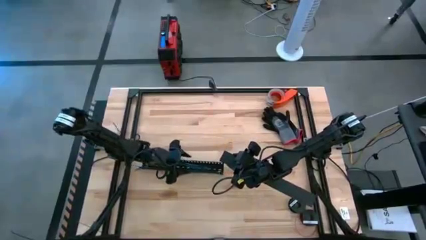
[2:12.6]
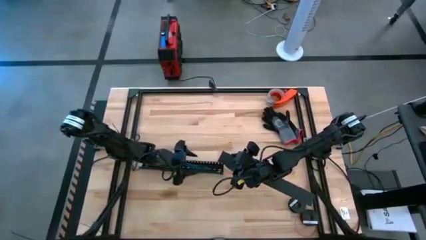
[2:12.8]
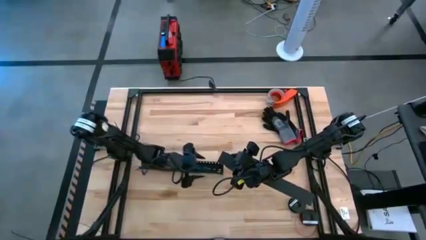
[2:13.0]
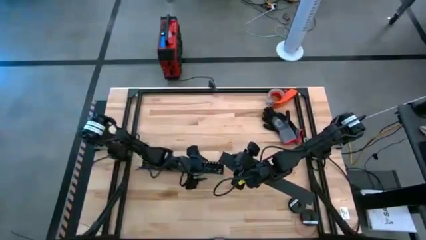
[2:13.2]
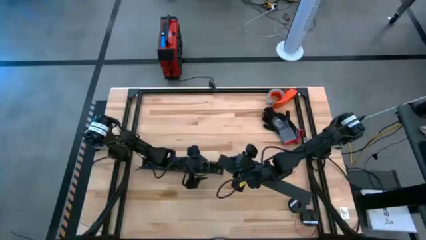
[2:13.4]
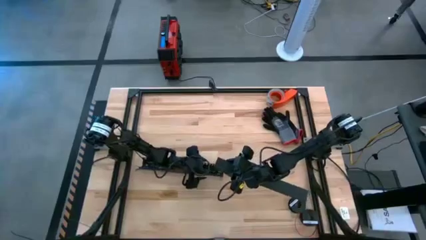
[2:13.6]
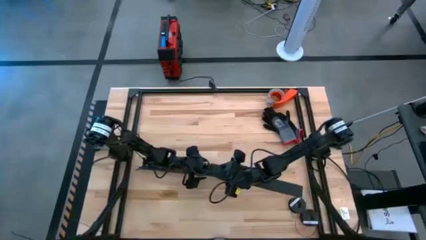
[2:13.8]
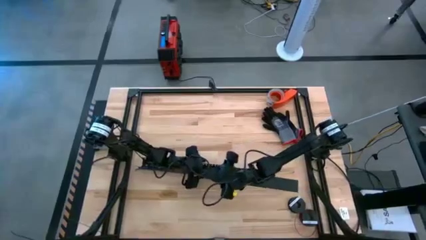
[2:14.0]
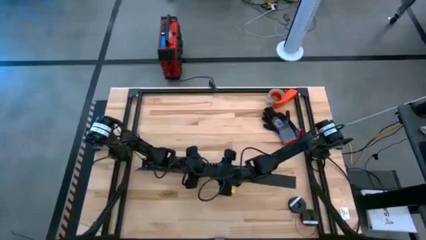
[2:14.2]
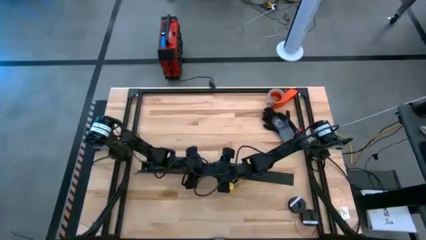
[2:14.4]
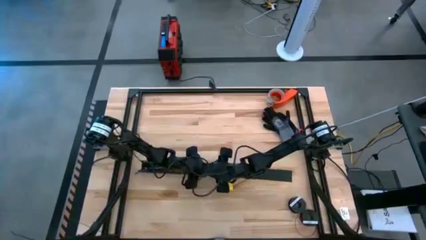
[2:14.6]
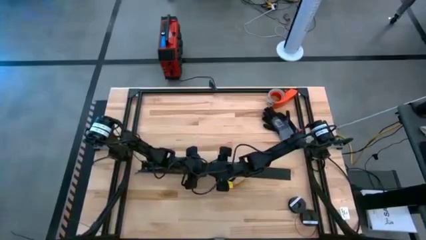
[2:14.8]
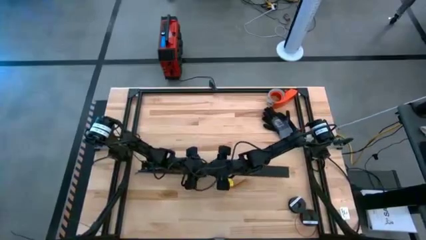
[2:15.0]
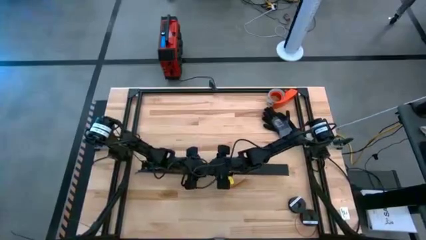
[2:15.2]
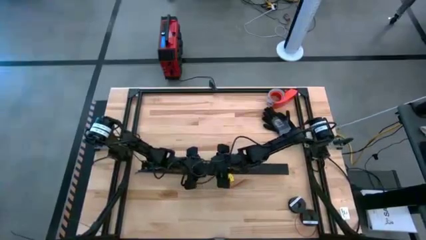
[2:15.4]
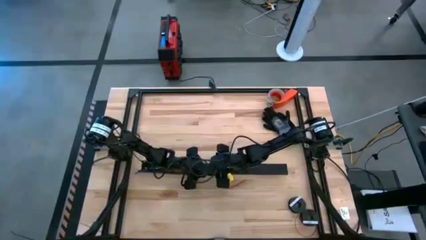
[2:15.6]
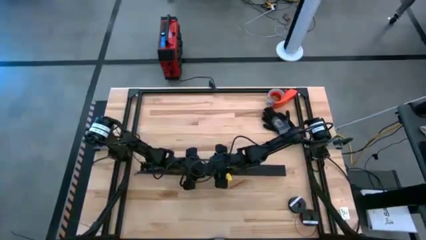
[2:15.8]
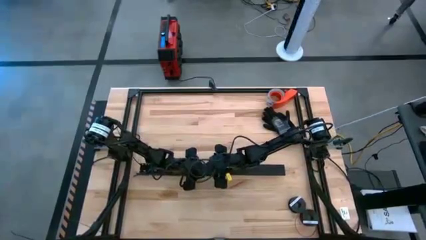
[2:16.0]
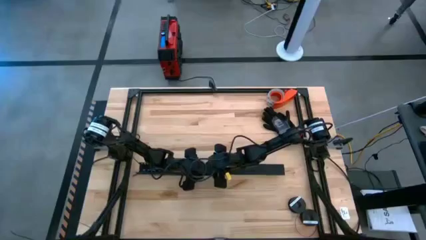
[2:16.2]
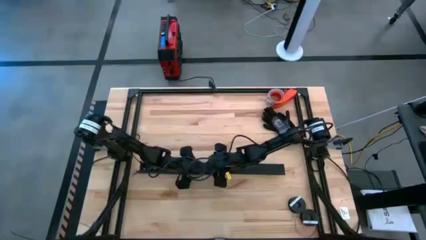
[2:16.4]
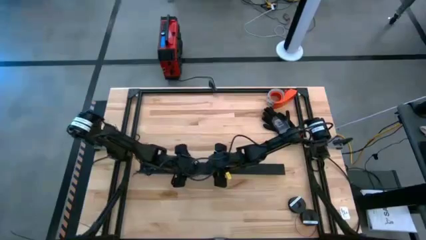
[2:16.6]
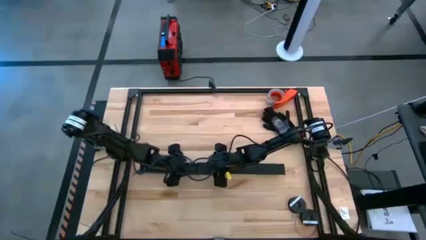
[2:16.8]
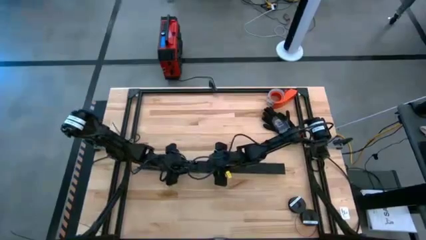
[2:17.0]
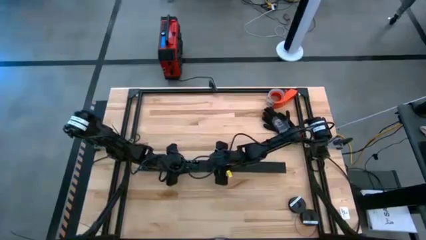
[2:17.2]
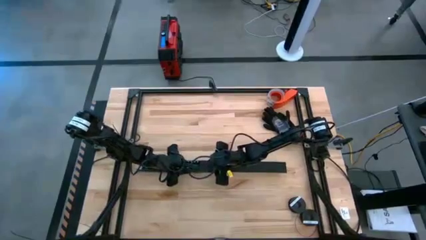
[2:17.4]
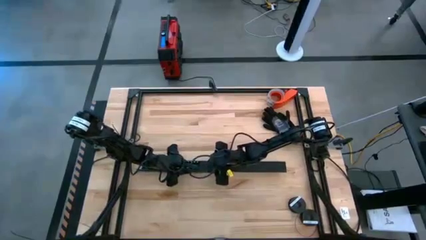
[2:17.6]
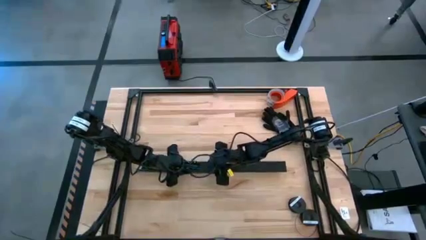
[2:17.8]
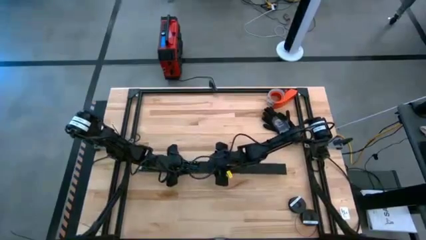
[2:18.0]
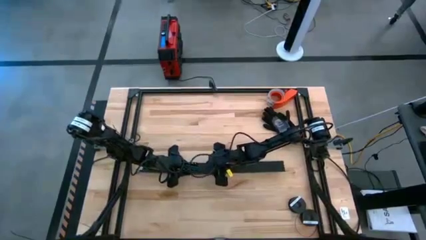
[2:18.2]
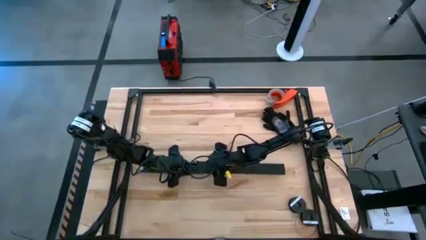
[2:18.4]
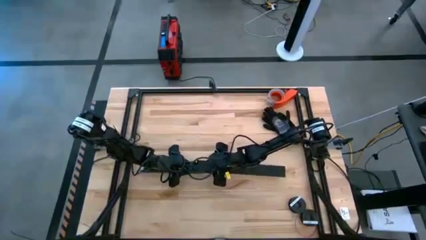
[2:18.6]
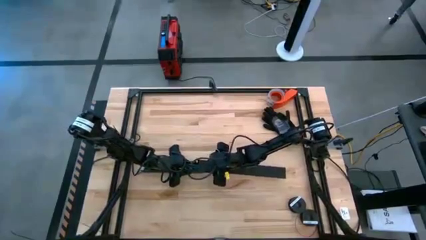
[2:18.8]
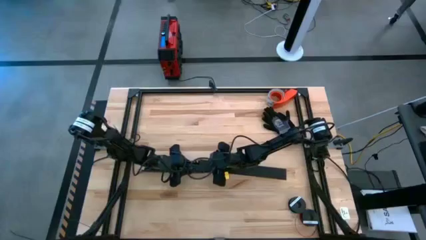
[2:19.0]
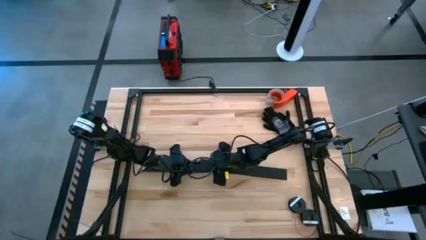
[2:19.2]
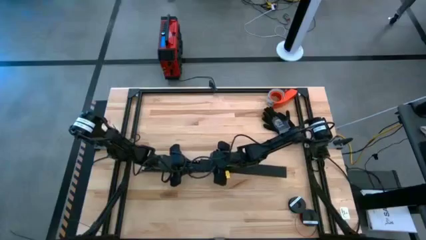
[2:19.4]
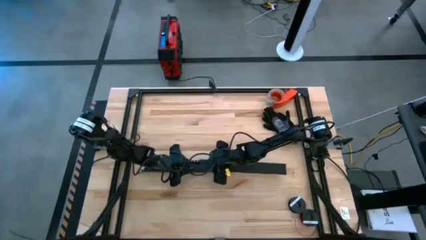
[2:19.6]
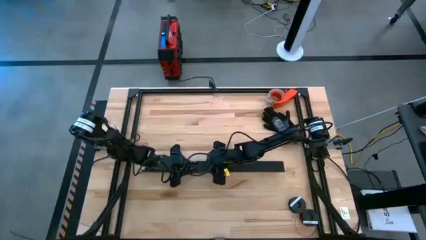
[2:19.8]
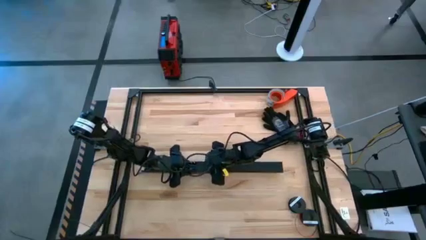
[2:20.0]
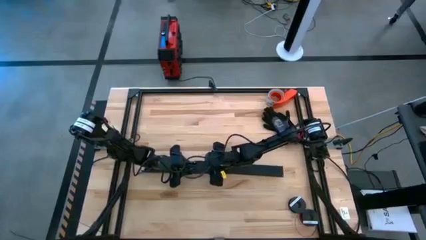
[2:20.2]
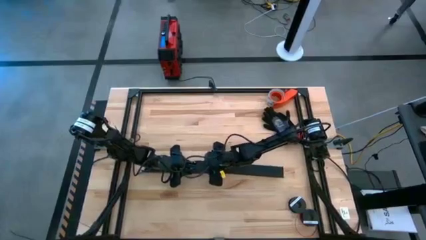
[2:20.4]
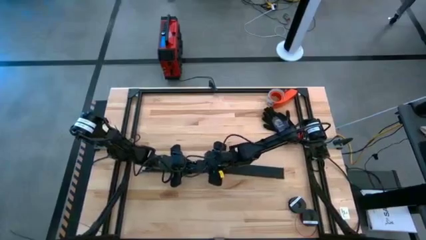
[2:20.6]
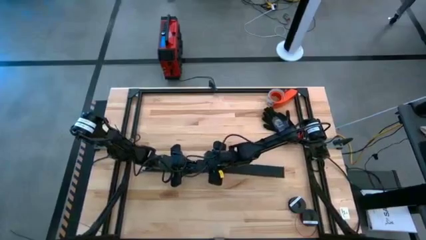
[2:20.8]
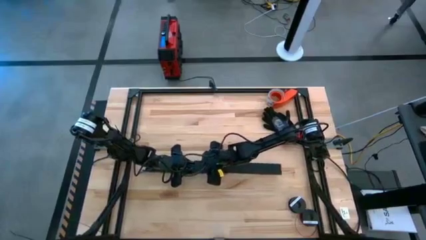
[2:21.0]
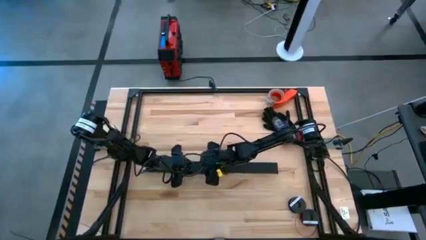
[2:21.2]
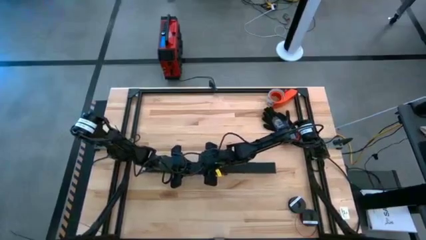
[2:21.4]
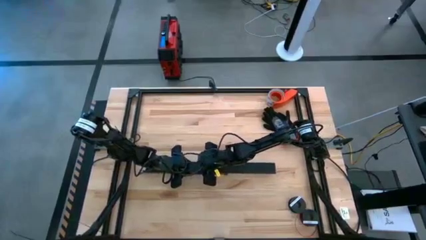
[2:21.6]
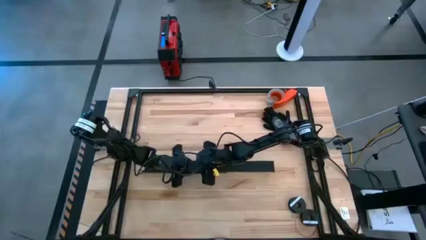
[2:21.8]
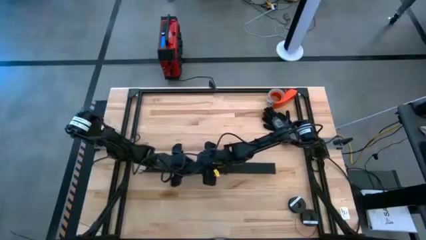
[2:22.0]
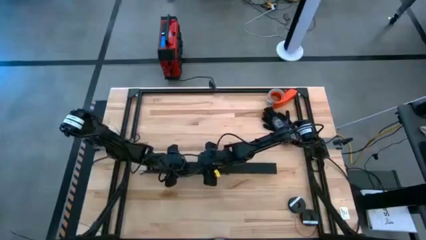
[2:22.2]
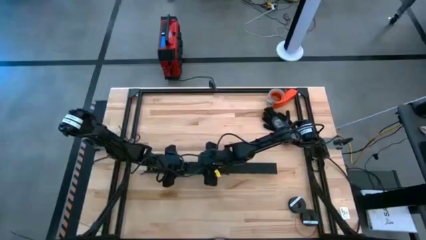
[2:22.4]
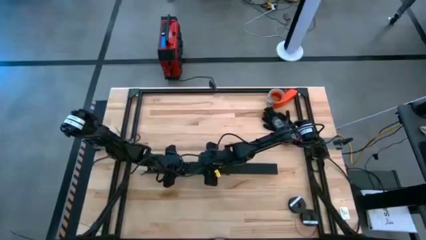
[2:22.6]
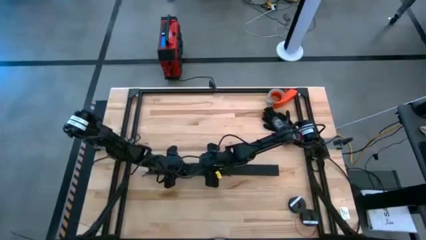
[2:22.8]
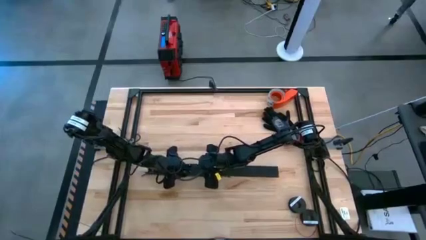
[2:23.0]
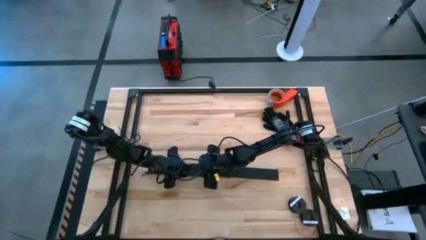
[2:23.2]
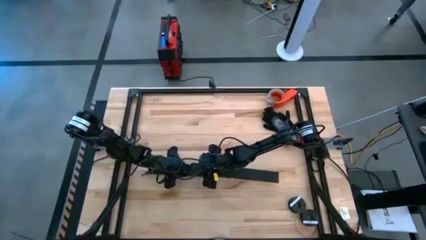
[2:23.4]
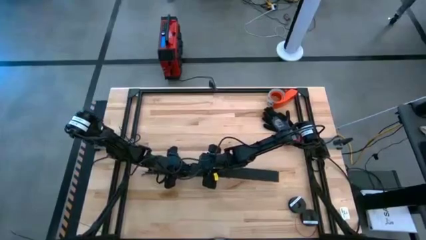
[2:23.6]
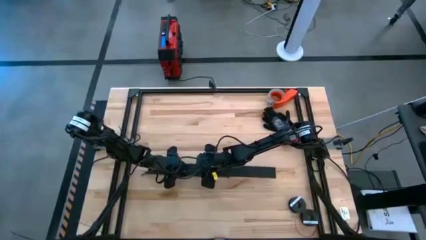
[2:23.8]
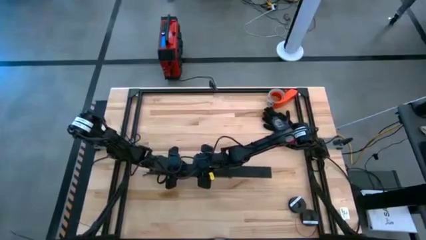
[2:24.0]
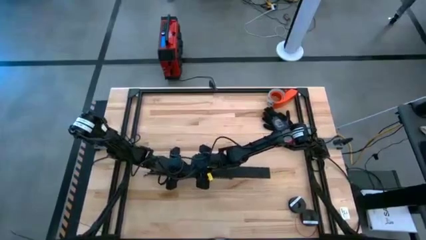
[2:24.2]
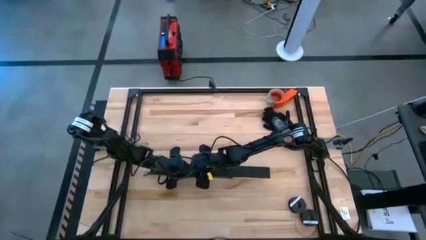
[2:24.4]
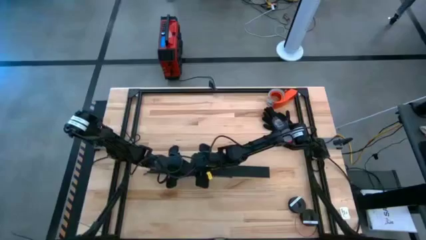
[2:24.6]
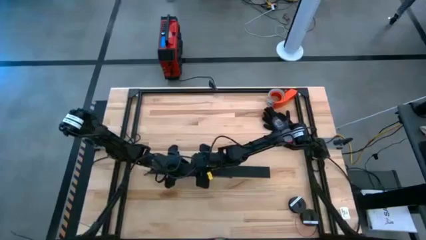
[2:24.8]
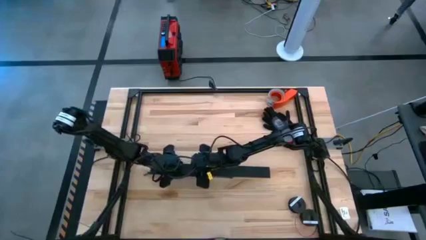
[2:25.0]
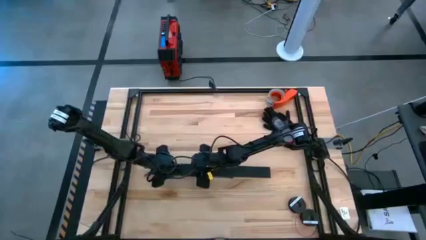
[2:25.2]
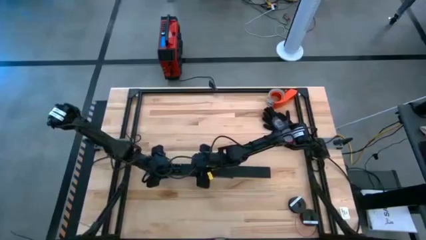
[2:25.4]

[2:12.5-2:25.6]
Task: Ziptie cables
Close the black cable duct

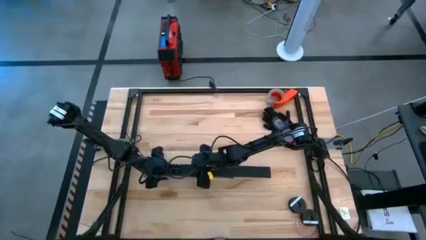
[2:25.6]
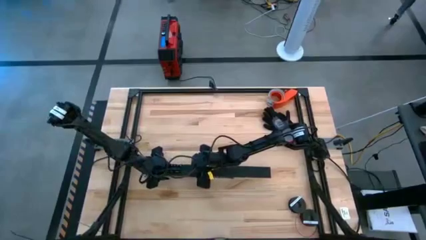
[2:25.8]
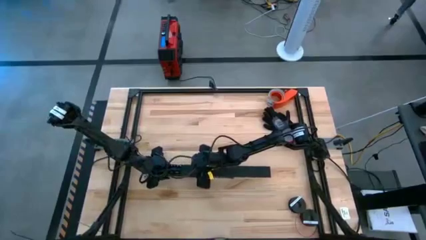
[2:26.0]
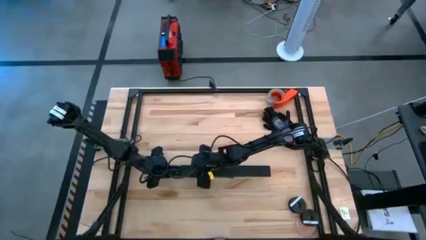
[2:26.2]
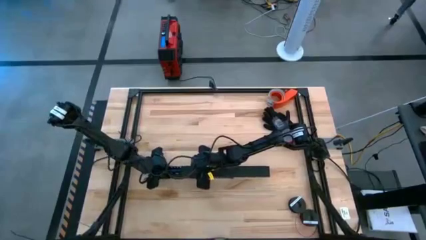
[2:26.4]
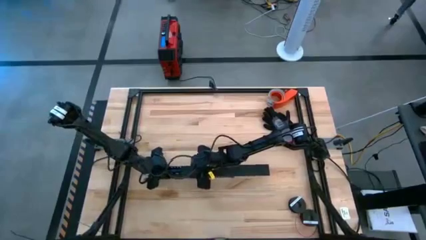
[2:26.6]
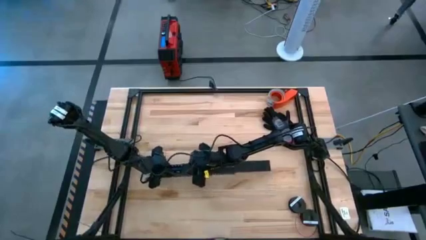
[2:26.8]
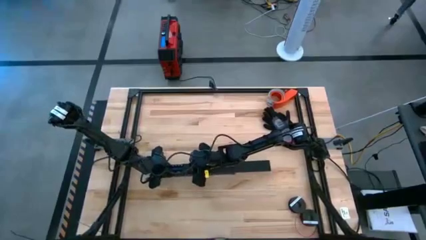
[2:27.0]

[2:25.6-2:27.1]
Close the black cable duct

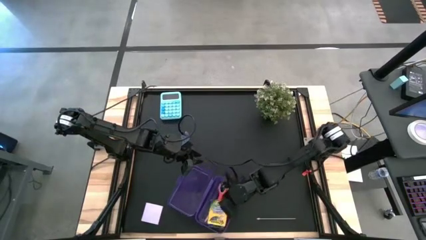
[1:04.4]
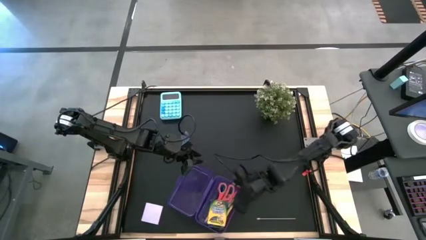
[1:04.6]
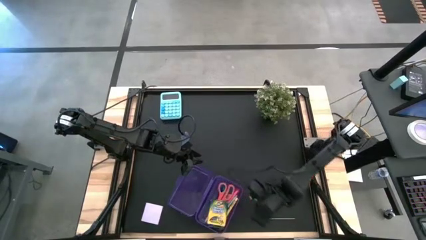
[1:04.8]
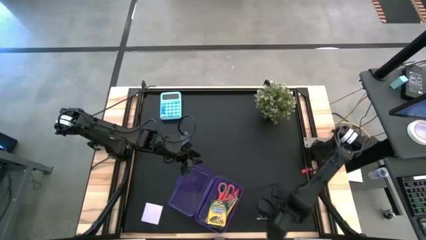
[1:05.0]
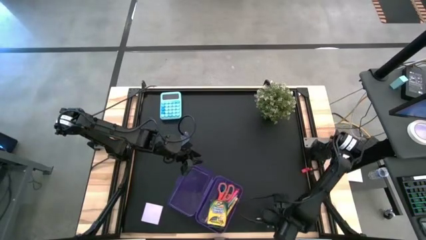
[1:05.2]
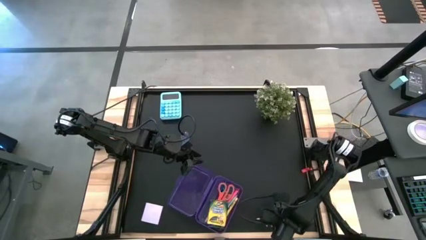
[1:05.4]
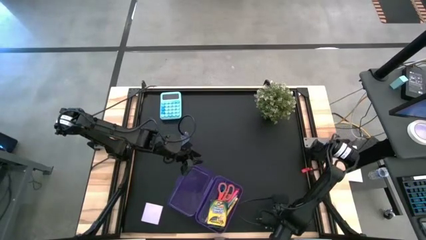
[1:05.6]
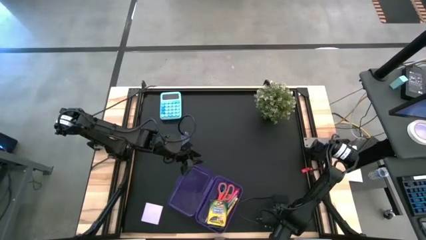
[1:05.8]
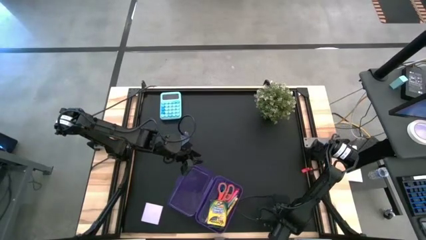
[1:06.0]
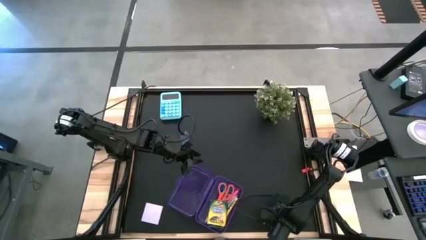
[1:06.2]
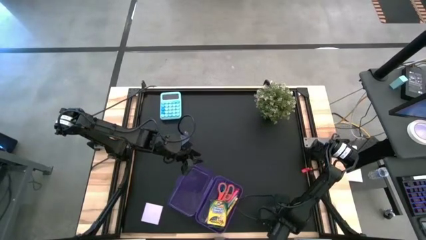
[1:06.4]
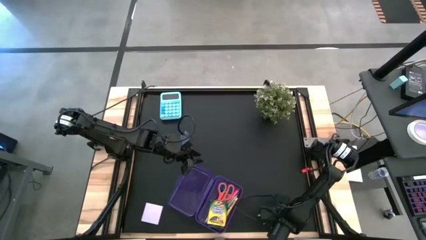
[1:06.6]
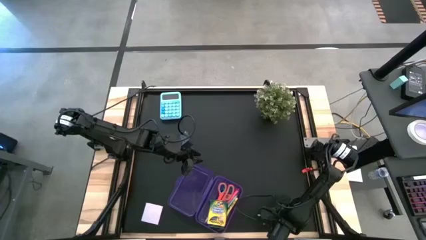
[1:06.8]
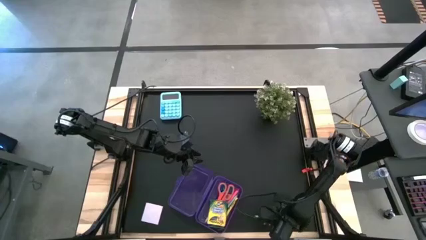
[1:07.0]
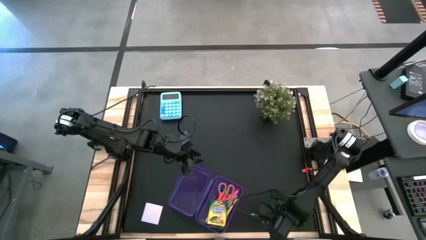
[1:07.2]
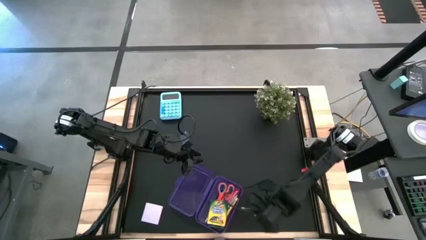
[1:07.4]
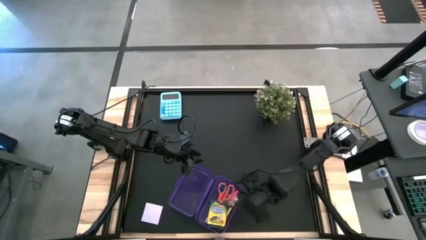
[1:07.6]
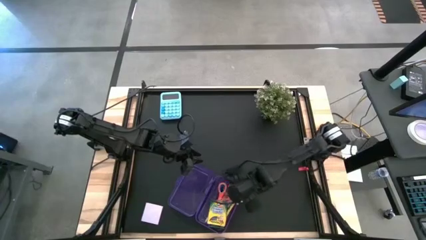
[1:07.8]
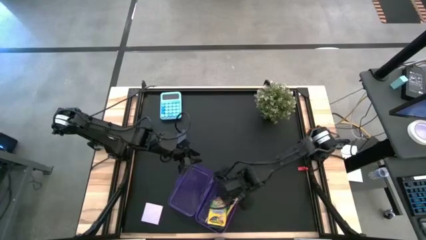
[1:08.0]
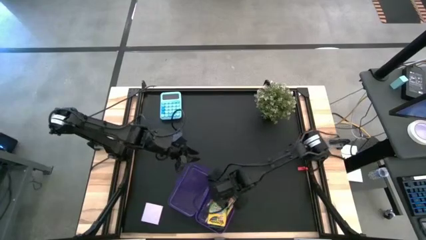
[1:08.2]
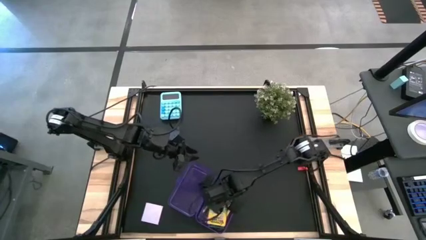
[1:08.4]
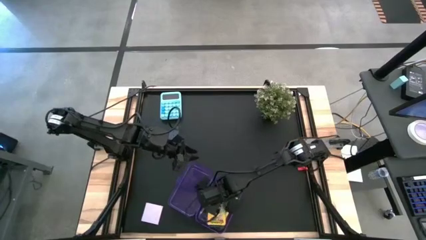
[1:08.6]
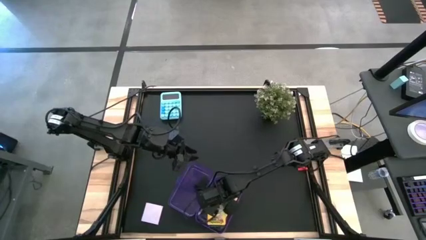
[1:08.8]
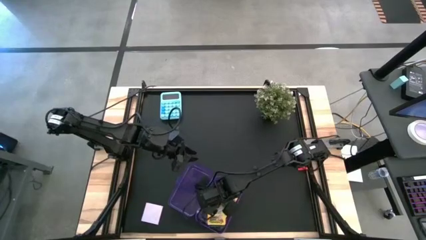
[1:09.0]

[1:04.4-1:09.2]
Task: Pack school essentials
Put the blue pencil into the purple supply box
